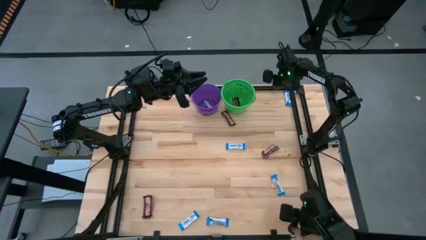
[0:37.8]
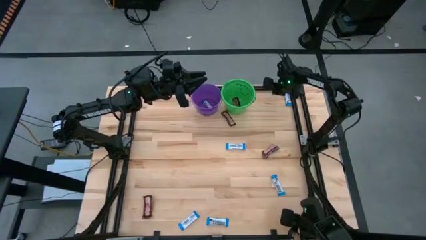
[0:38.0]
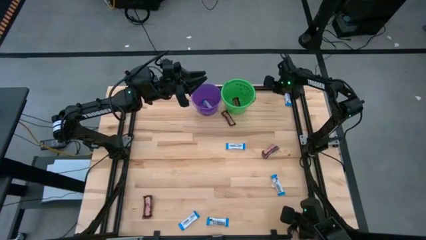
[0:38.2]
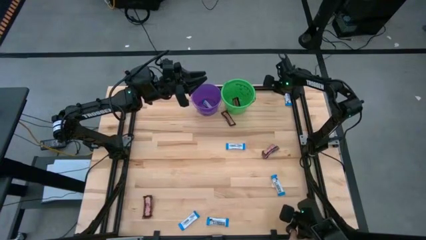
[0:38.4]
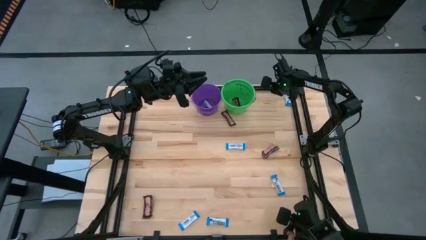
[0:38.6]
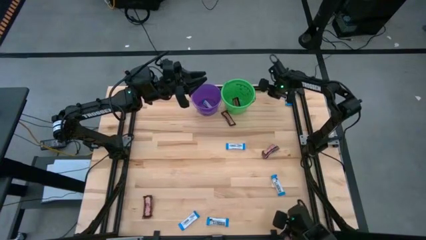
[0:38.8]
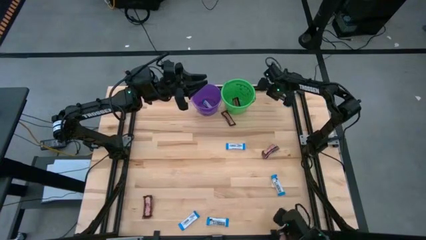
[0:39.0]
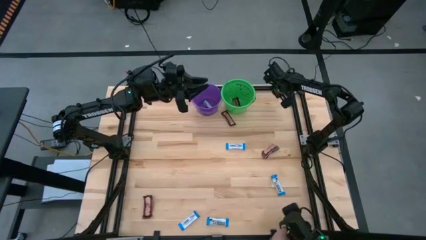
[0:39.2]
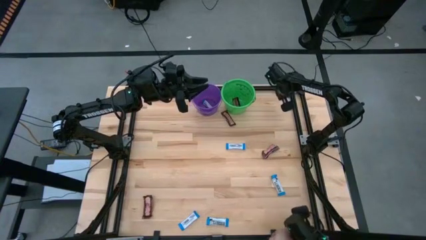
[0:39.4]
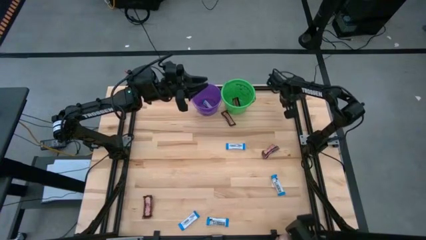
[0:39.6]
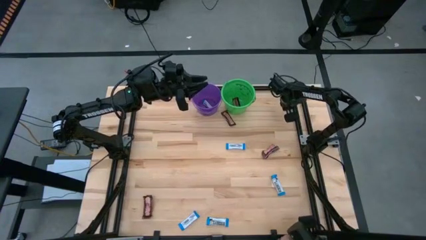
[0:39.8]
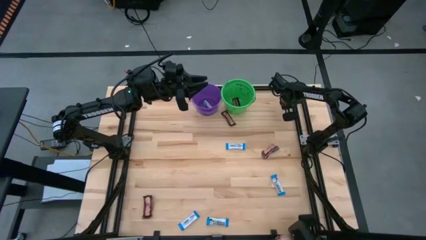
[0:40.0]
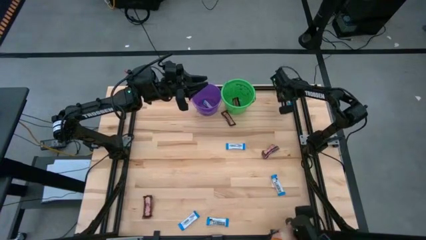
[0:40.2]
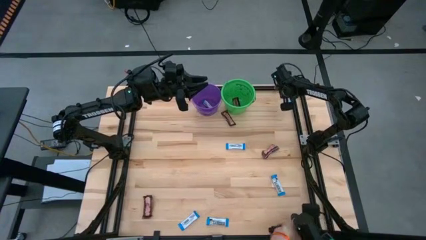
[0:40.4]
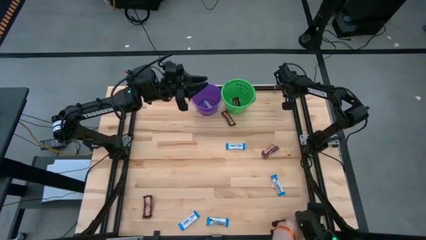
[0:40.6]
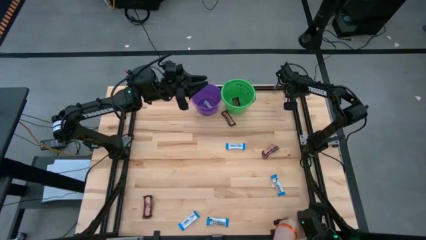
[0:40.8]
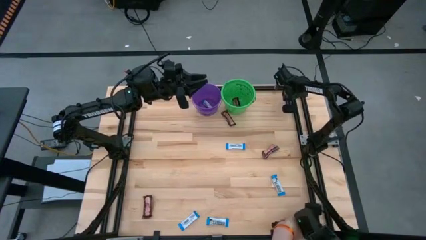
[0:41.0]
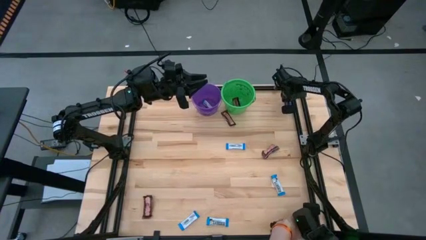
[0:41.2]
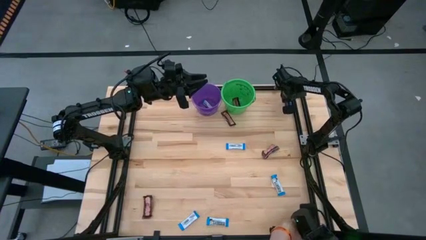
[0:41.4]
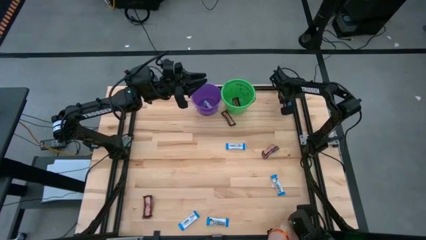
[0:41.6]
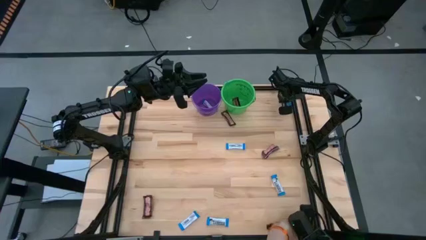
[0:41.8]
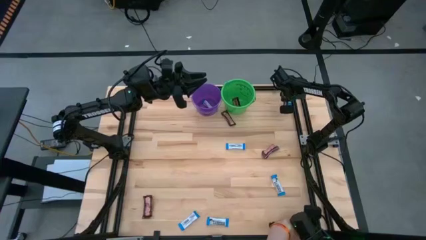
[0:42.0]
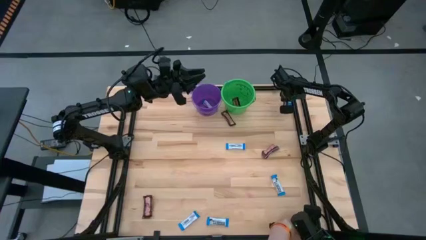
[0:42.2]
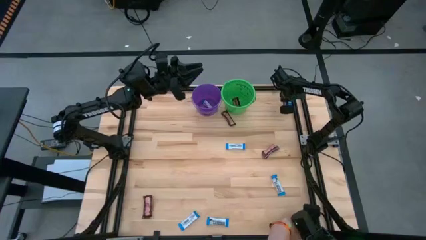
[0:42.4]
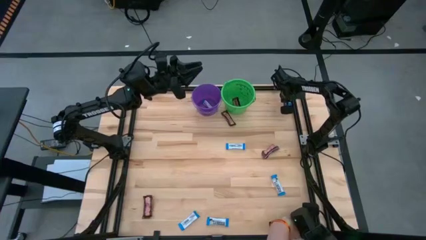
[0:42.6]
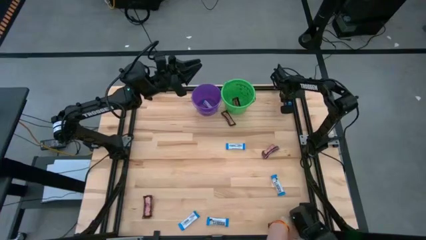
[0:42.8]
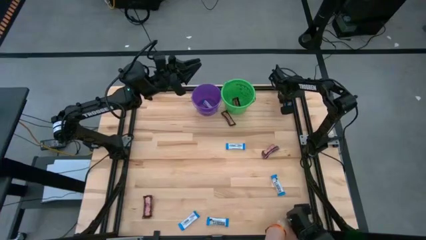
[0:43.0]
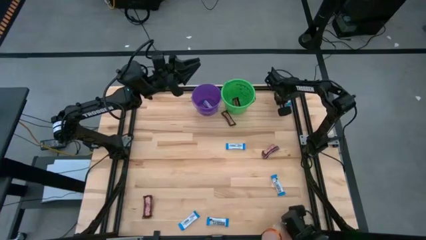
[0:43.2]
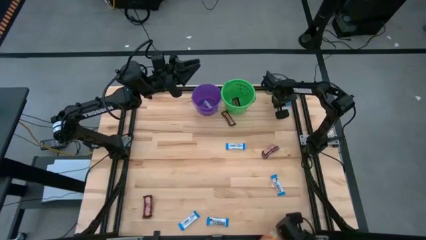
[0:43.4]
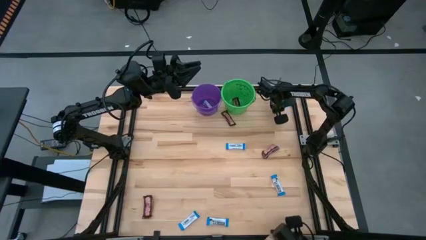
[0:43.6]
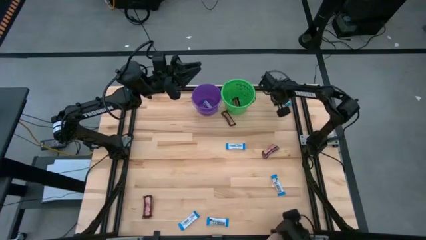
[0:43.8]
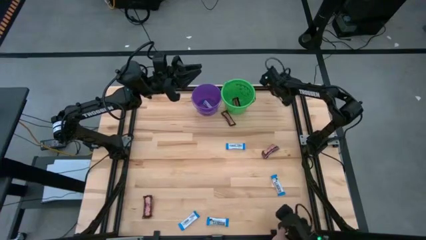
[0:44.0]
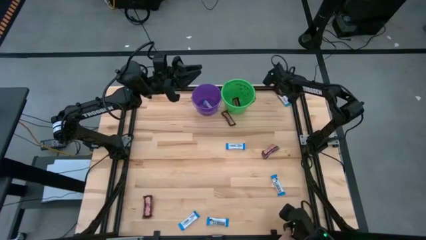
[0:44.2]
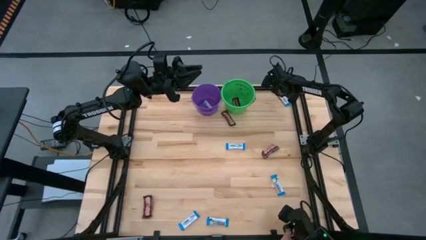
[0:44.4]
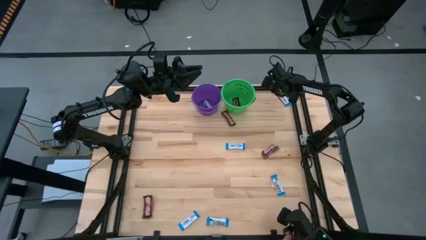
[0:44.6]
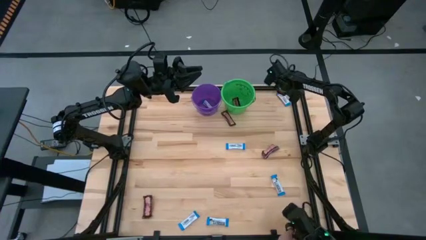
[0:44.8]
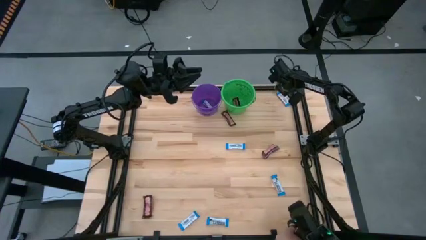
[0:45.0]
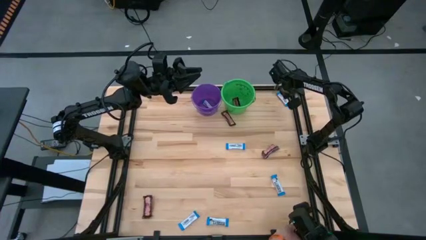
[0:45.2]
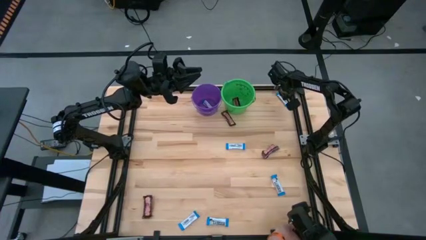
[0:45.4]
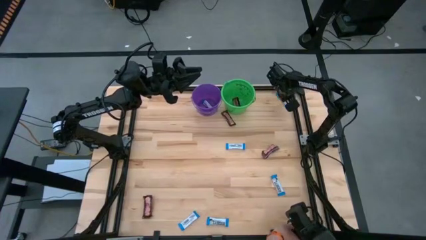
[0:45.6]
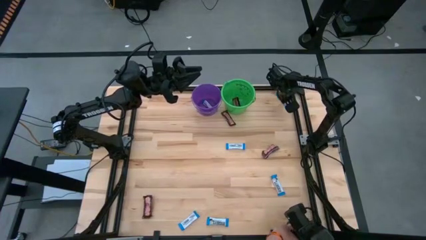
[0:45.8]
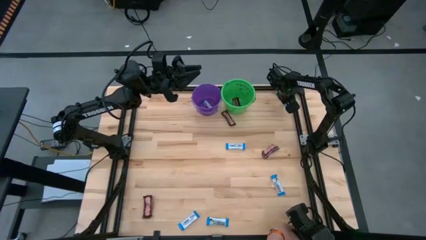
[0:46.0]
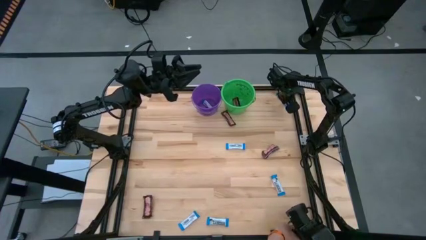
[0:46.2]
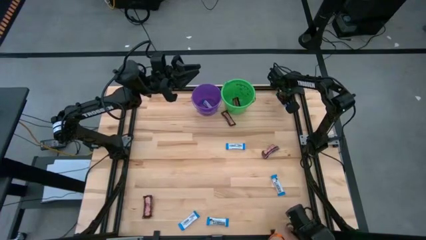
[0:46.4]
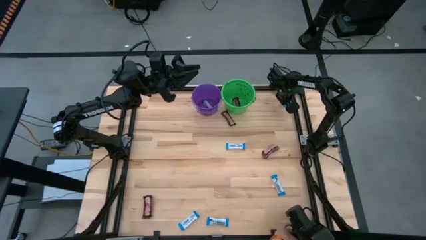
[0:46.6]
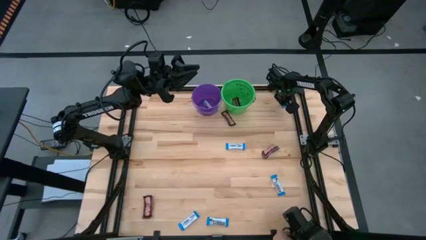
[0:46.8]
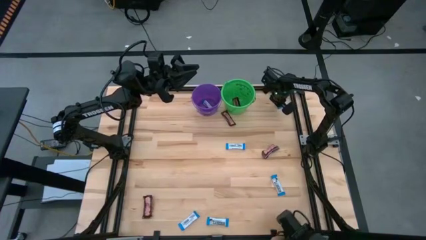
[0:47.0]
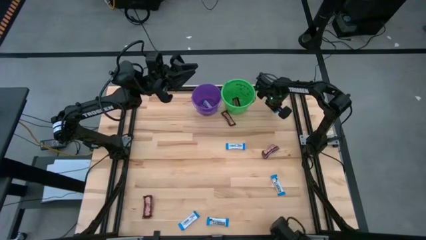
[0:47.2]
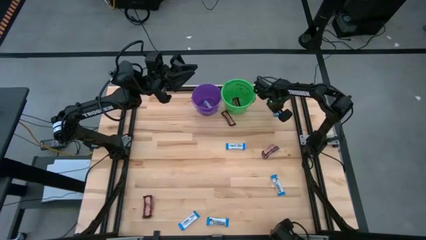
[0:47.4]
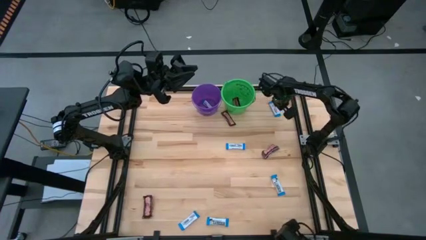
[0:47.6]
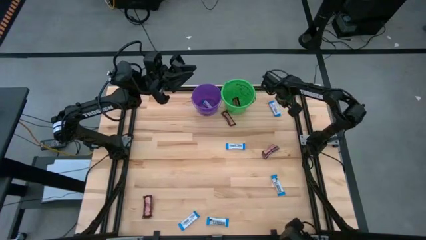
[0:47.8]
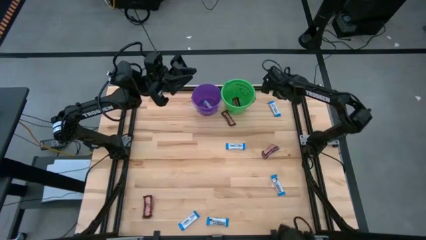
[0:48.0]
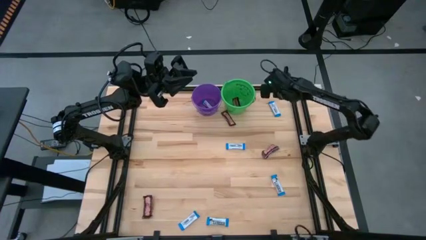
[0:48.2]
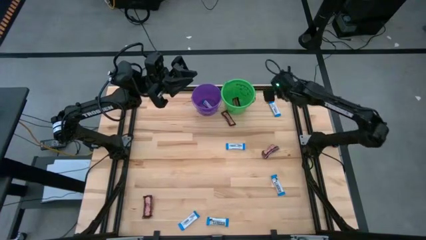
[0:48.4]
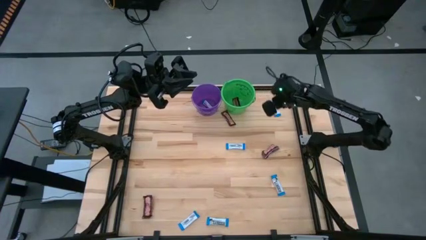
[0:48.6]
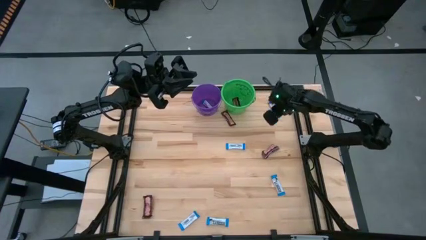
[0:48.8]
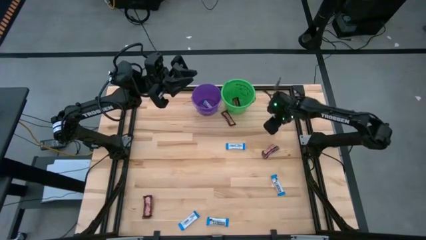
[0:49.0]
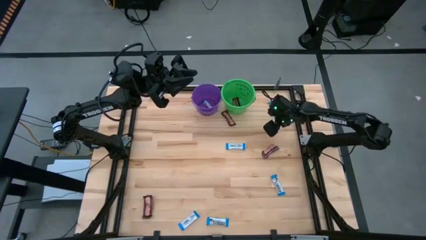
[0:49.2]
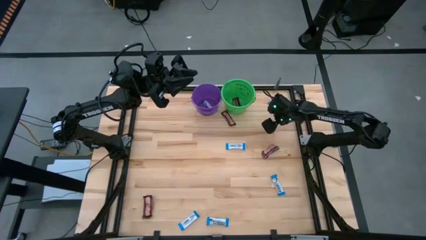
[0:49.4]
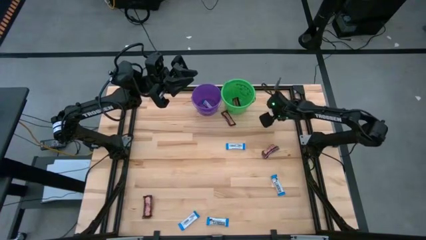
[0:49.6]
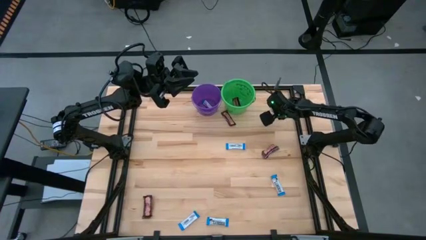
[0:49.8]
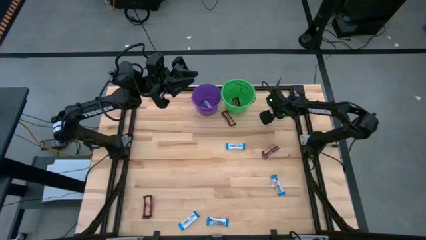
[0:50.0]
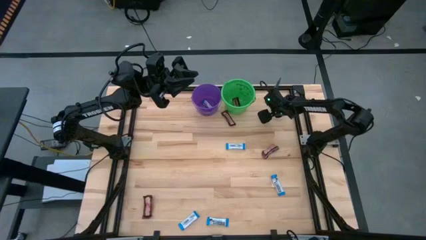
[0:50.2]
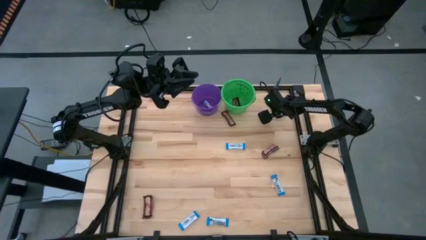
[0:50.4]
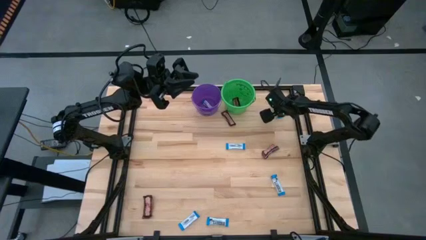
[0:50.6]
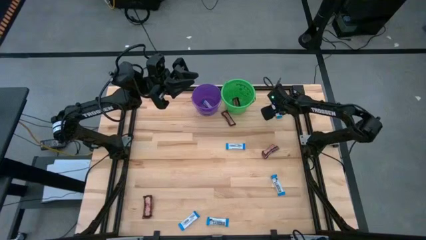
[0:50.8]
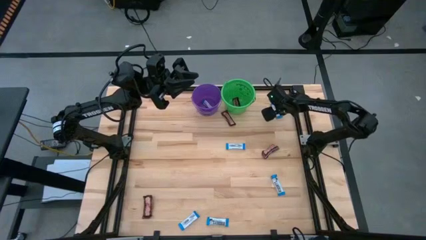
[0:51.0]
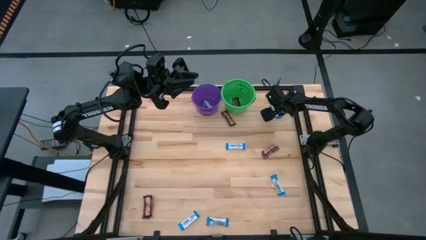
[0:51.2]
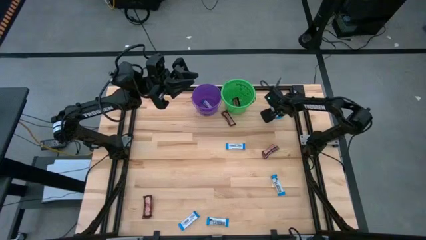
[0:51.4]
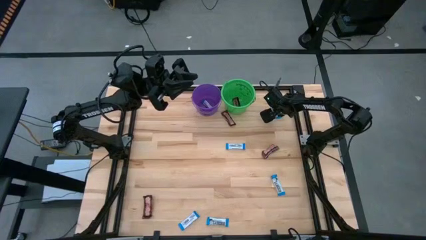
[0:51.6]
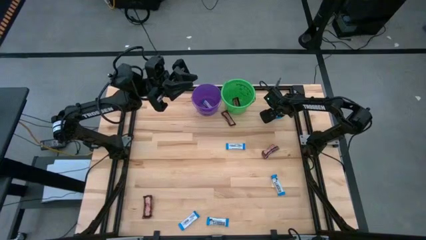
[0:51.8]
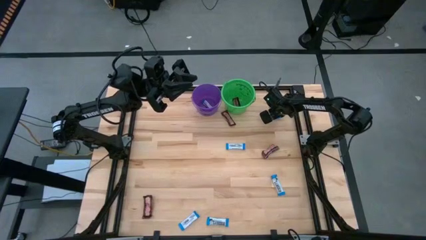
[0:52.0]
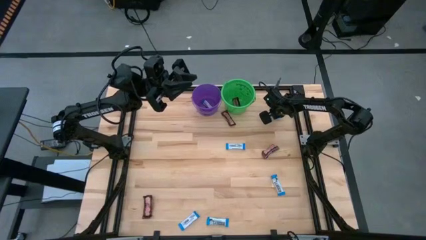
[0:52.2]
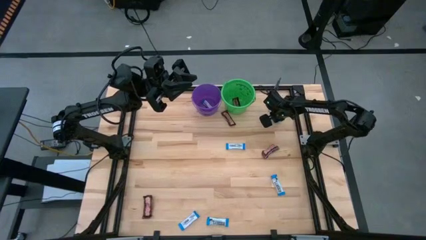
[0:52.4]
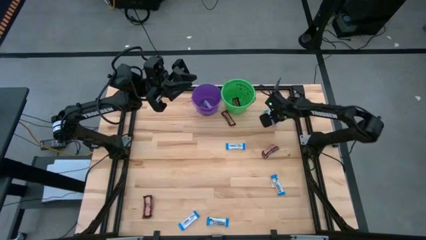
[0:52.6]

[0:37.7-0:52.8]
Task: Sort candy by brand, put in halloween buckets
Put the white chocolate bar into the purple bucket
